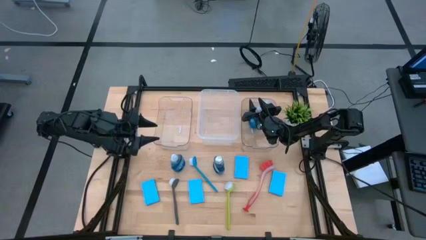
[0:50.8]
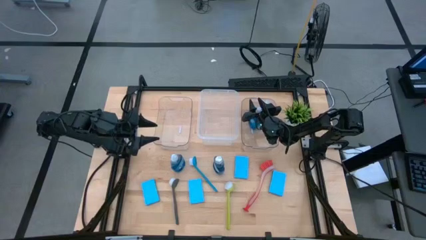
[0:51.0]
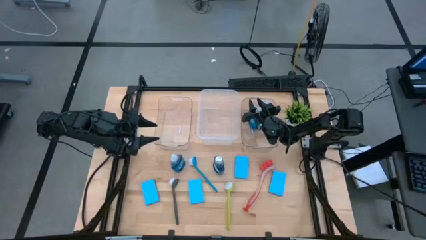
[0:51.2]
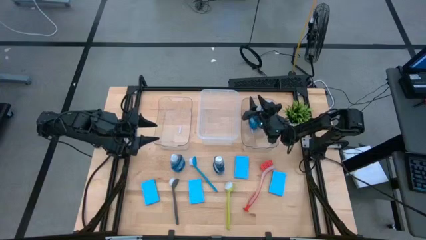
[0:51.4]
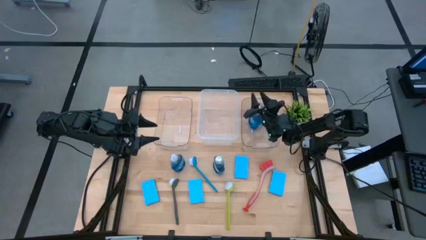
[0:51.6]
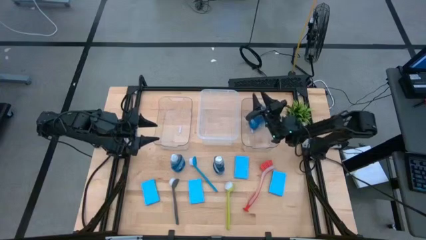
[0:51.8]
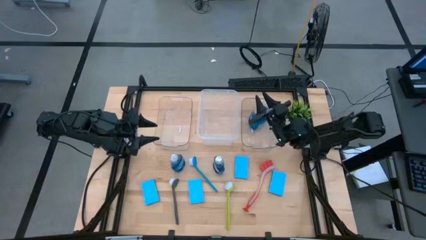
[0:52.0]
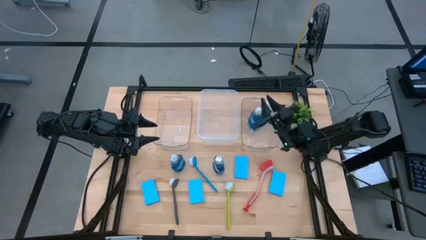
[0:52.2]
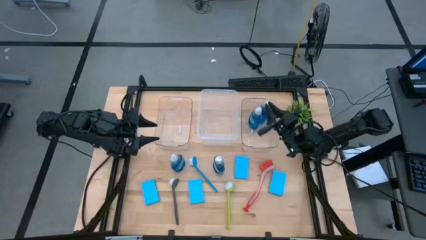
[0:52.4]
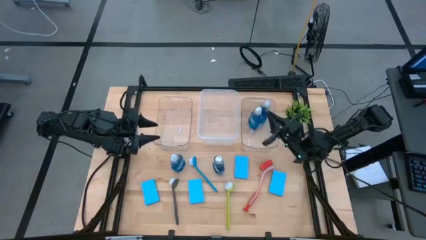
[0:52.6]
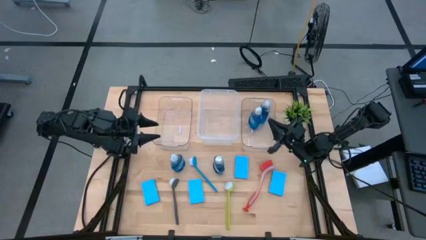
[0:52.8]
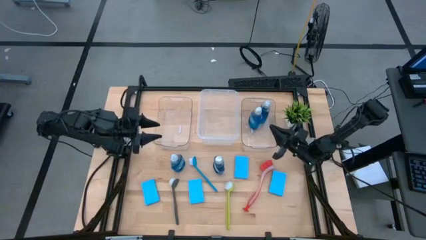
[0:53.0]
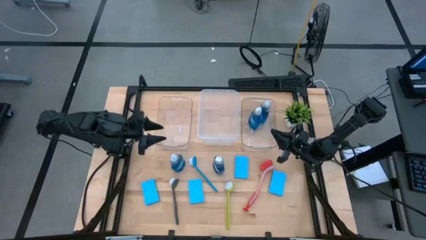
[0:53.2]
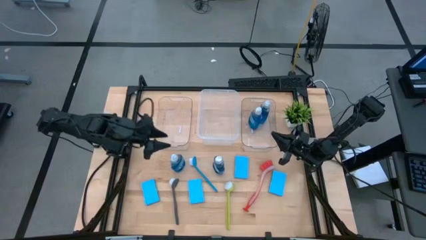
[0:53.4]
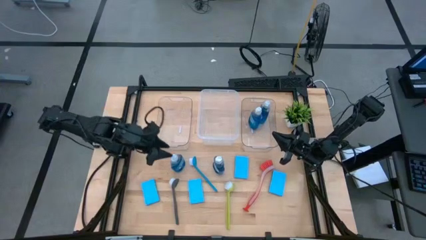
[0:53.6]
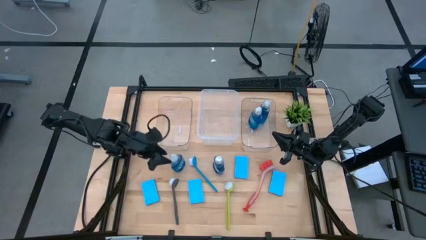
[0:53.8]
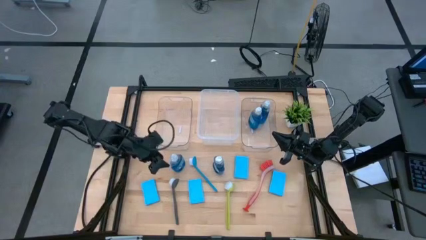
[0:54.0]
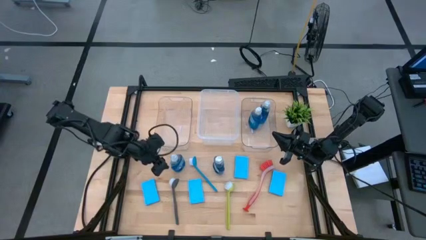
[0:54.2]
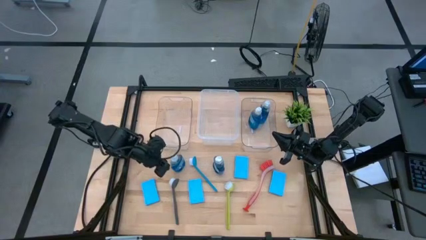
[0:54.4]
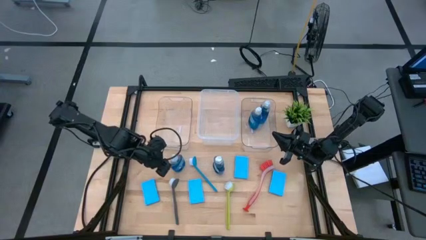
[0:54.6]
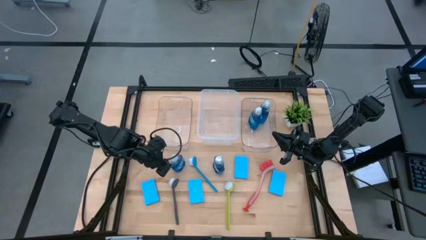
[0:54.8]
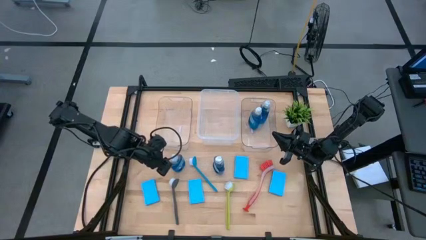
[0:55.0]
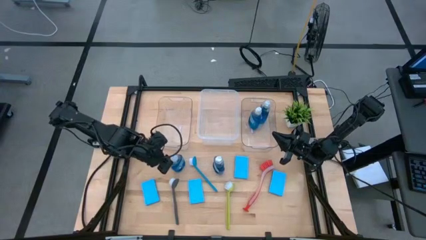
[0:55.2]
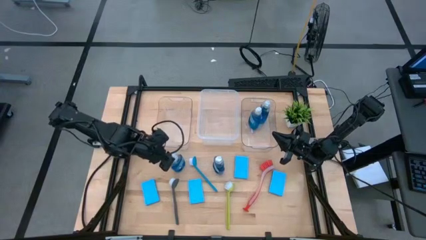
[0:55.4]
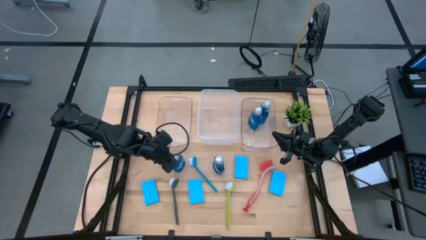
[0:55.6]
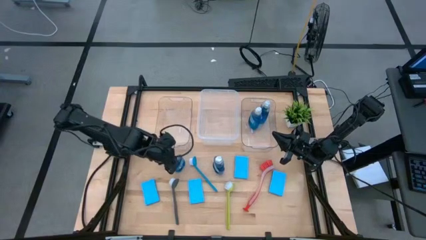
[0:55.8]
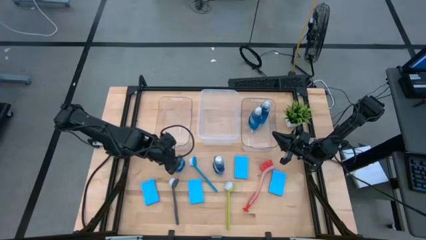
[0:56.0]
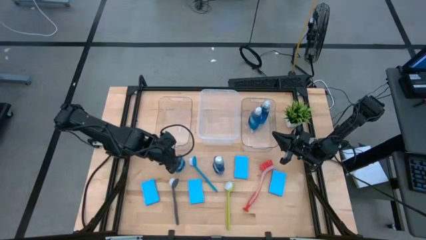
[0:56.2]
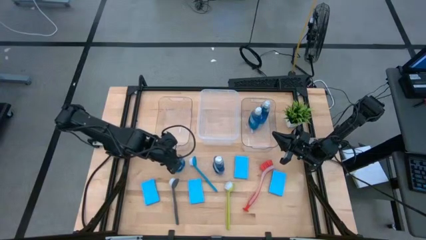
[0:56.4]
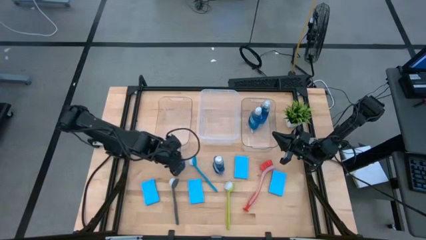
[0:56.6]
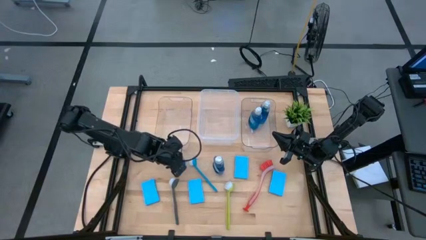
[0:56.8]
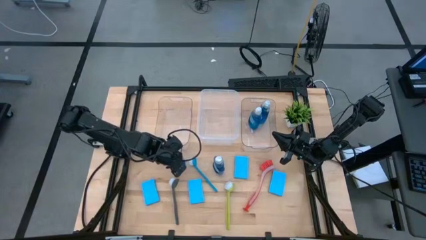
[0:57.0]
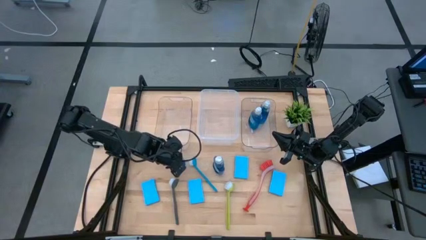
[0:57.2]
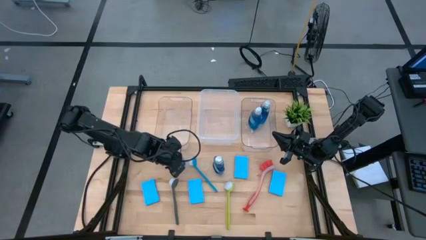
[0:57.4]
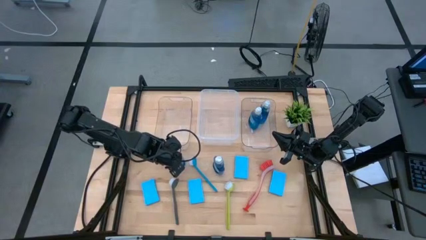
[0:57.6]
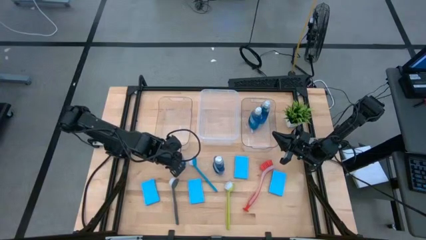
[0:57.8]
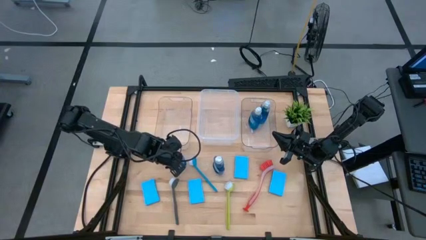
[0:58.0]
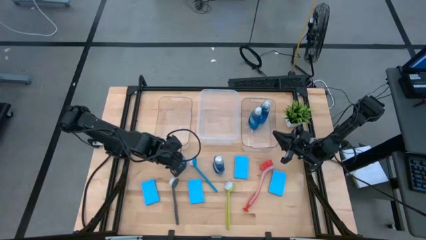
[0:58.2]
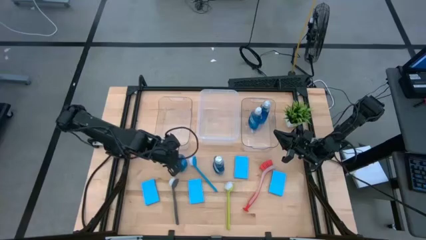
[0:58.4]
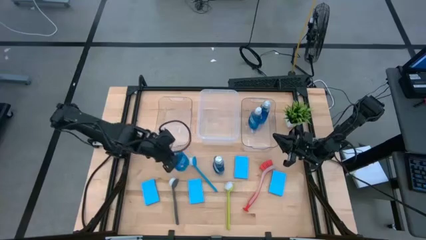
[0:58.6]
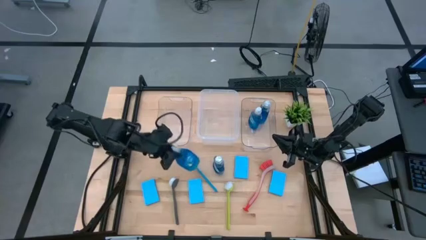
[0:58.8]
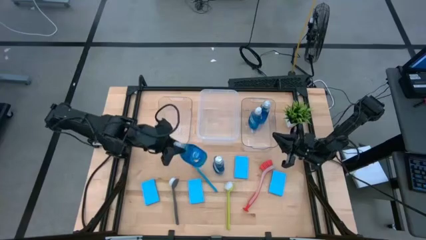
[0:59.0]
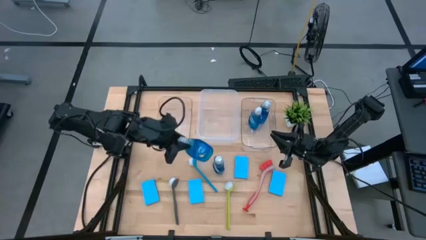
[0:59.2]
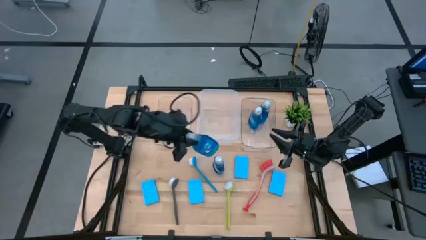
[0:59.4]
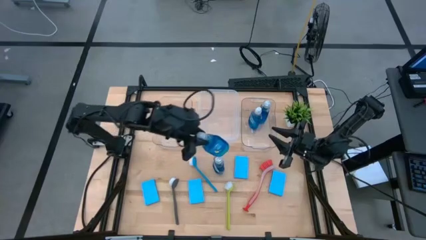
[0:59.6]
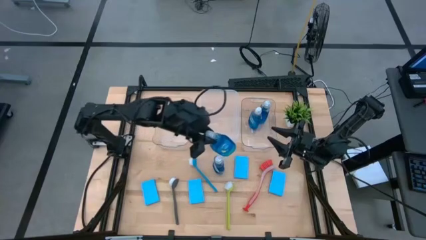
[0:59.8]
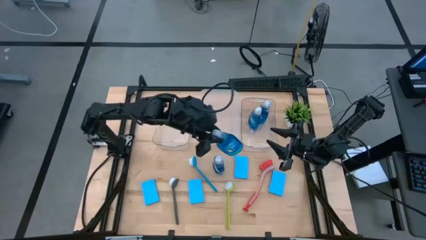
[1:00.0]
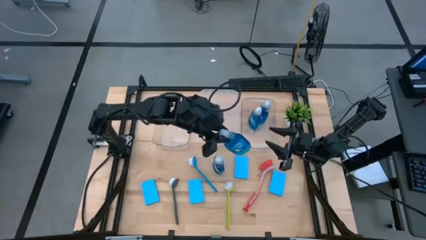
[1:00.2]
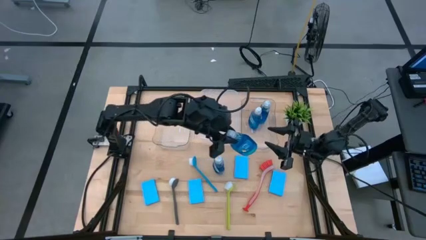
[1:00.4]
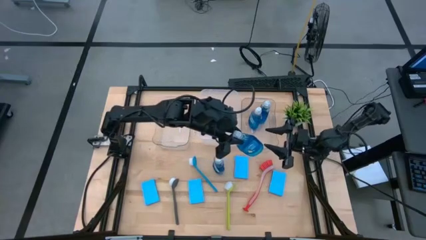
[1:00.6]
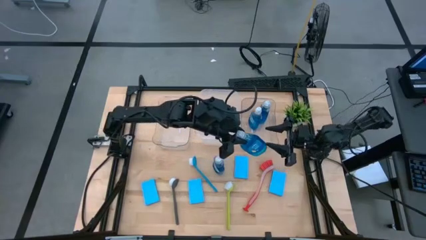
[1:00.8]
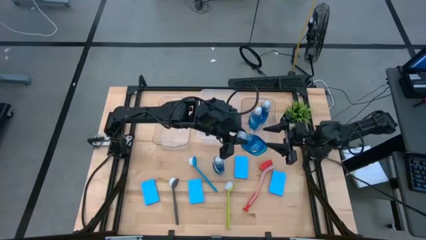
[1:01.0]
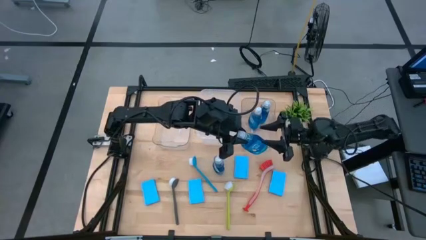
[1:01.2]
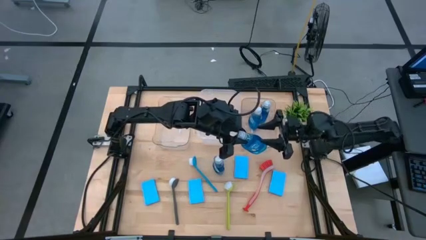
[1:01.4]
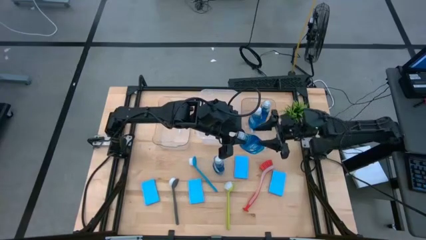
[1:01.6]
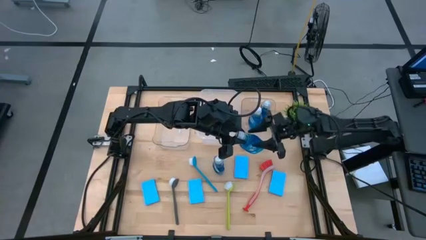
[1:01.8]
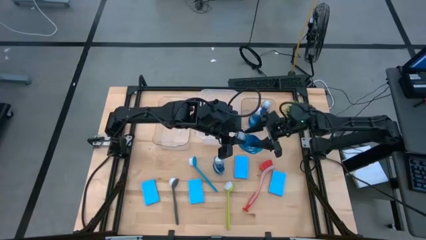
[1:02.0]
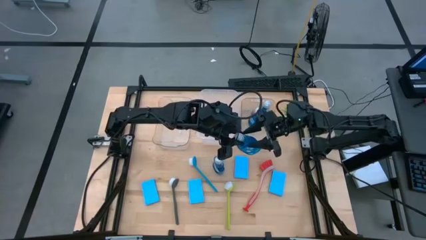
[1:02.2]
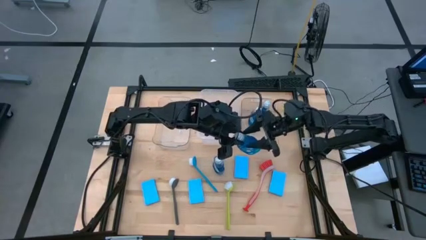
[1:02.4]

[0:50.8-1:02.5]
Task: Pick & Place Kitchen Sink Supplies
Put the blue dishwashing liquid into the right transparent bin
